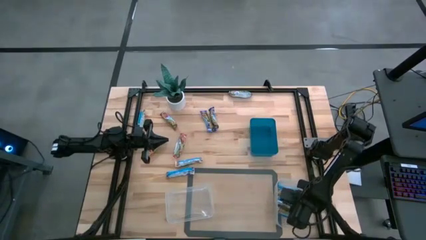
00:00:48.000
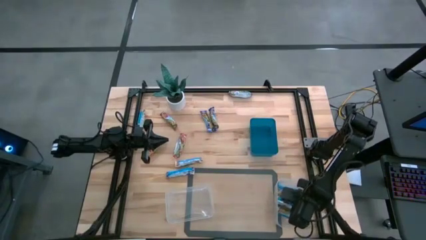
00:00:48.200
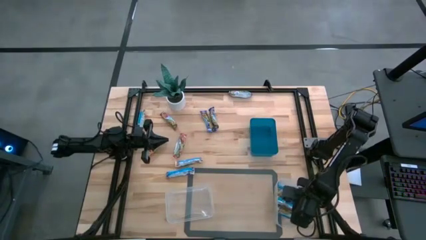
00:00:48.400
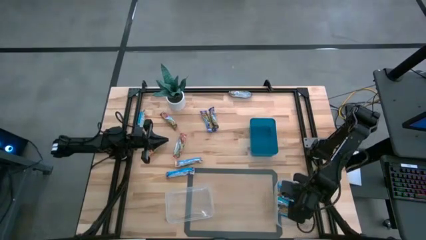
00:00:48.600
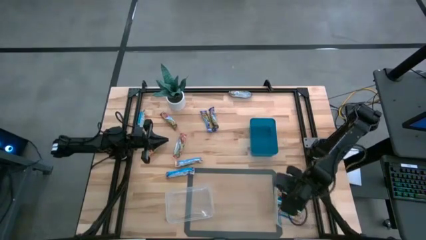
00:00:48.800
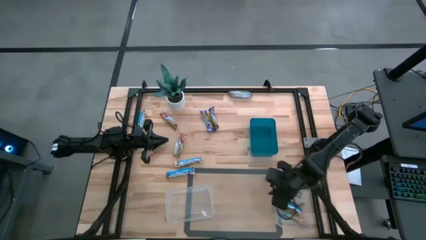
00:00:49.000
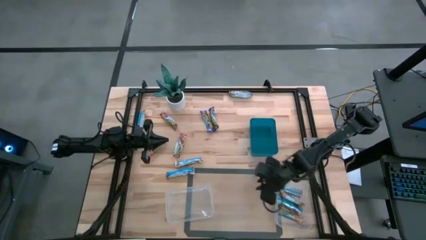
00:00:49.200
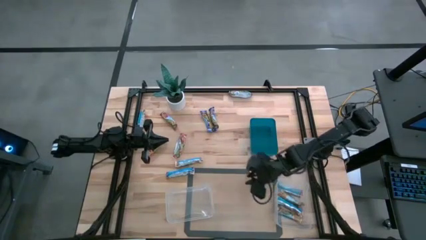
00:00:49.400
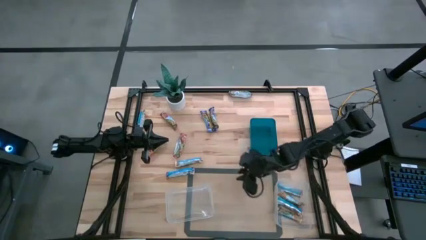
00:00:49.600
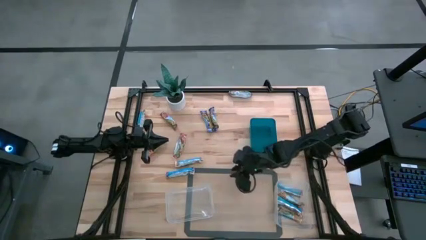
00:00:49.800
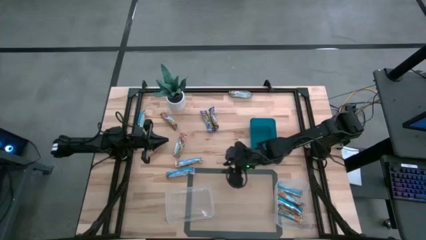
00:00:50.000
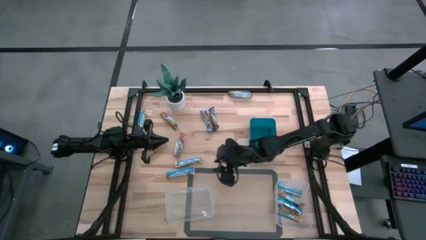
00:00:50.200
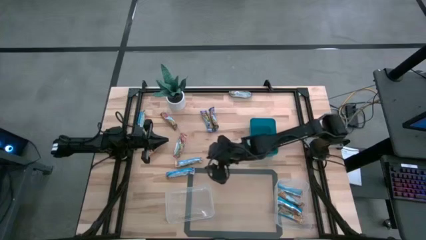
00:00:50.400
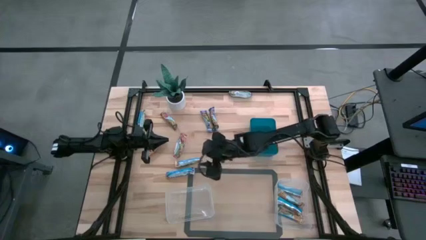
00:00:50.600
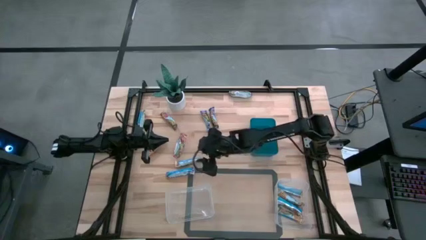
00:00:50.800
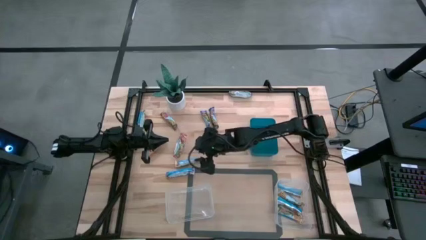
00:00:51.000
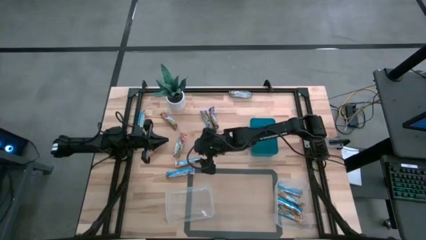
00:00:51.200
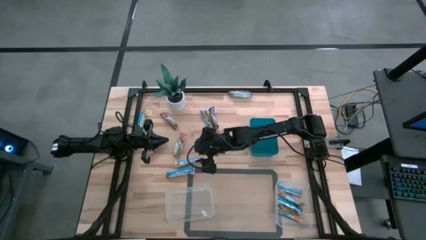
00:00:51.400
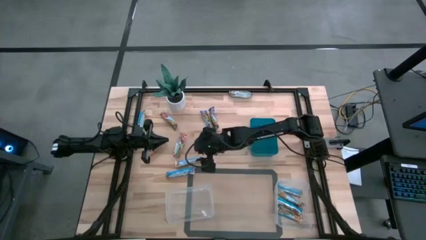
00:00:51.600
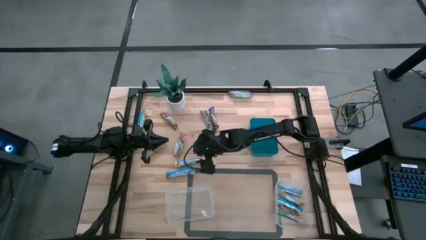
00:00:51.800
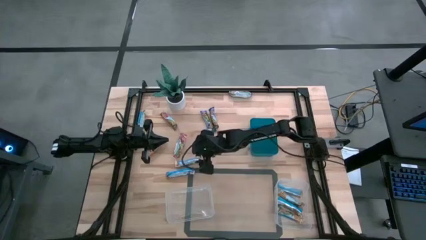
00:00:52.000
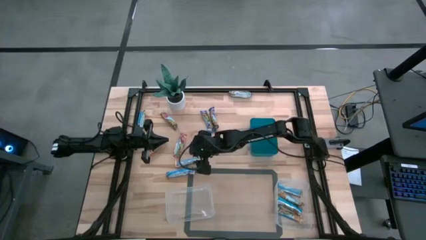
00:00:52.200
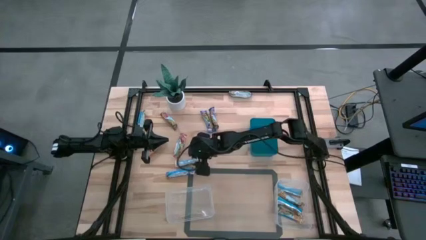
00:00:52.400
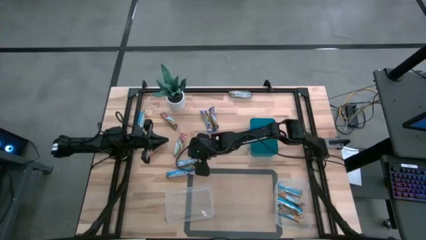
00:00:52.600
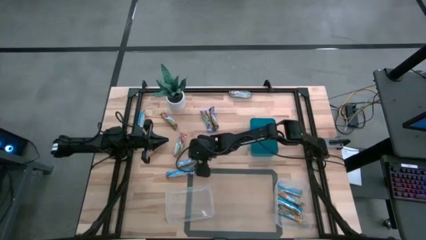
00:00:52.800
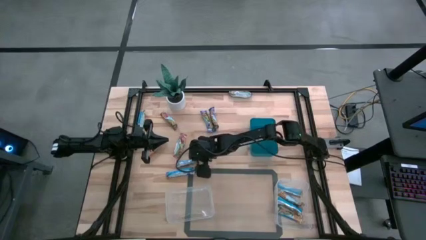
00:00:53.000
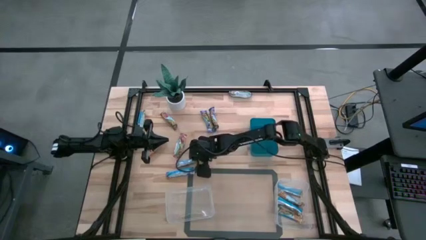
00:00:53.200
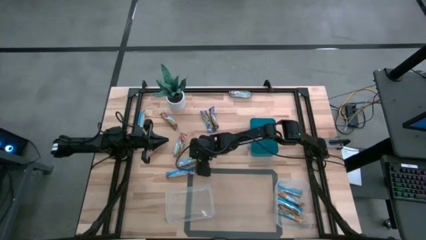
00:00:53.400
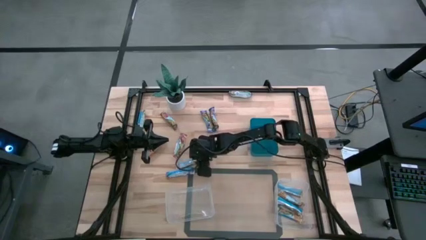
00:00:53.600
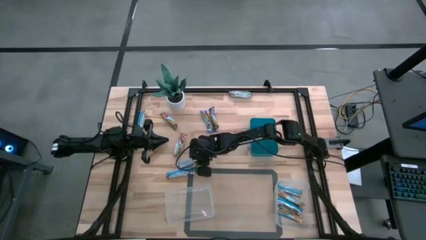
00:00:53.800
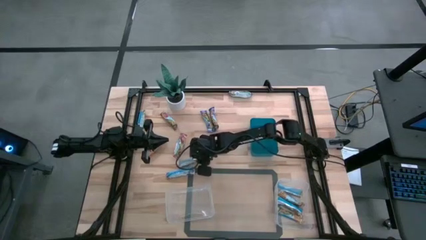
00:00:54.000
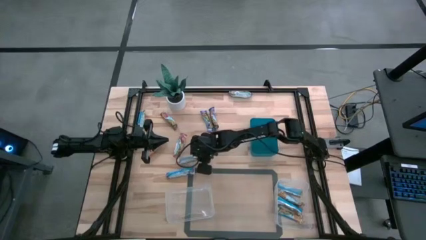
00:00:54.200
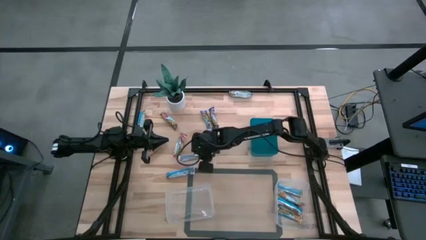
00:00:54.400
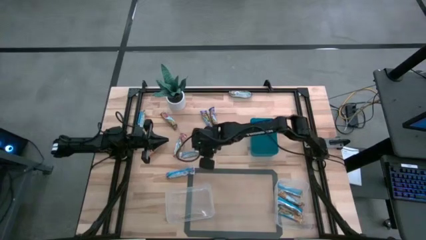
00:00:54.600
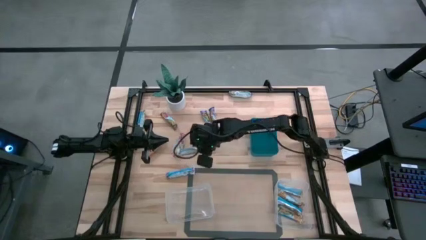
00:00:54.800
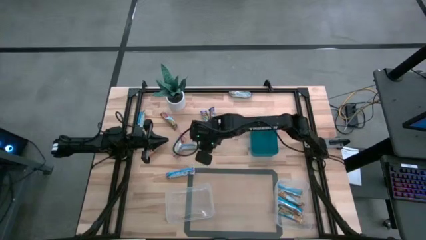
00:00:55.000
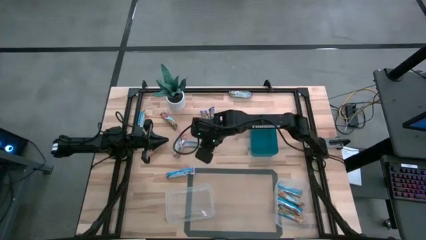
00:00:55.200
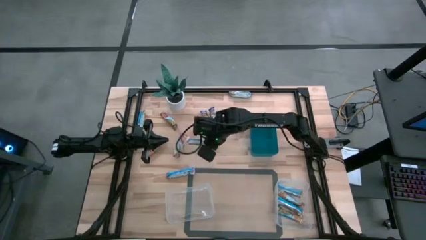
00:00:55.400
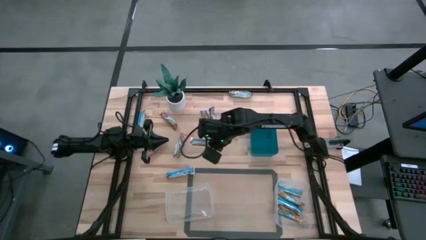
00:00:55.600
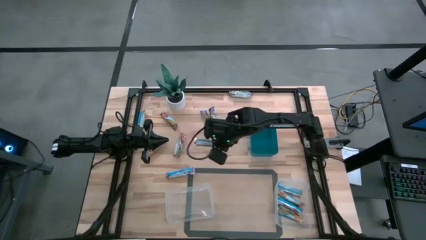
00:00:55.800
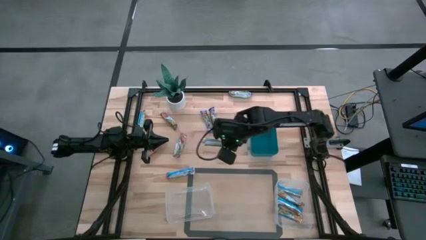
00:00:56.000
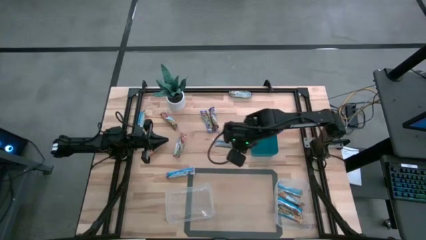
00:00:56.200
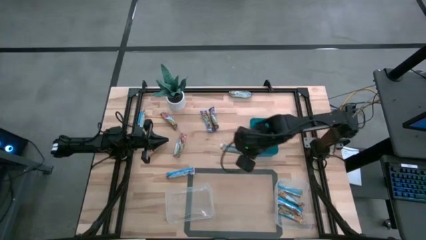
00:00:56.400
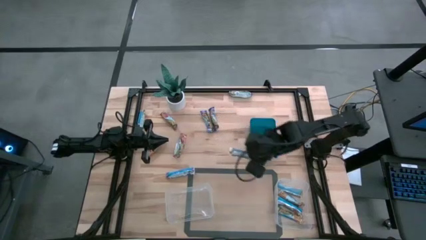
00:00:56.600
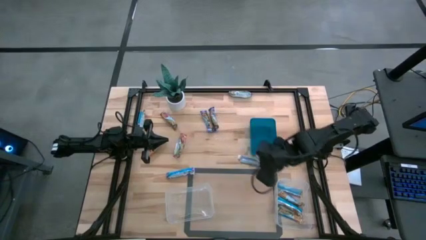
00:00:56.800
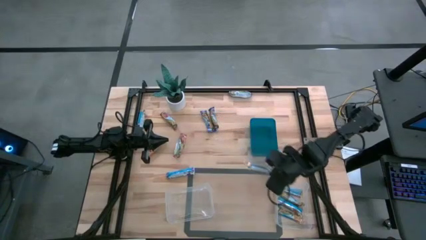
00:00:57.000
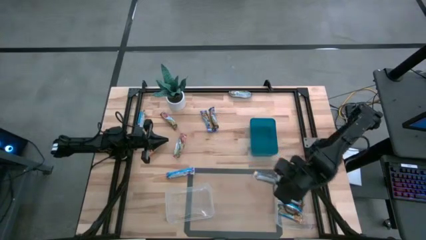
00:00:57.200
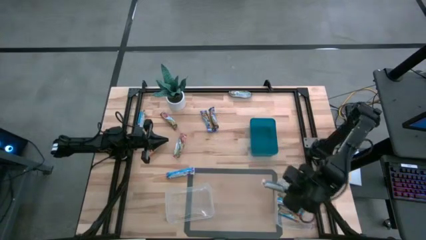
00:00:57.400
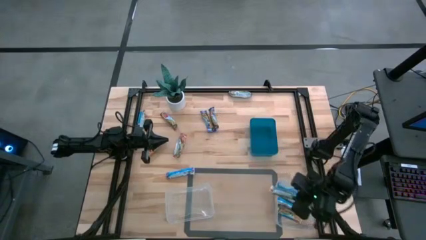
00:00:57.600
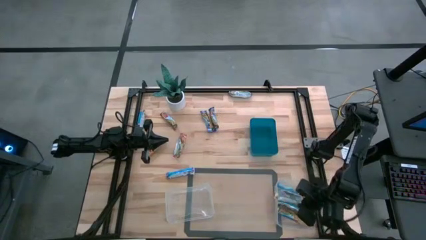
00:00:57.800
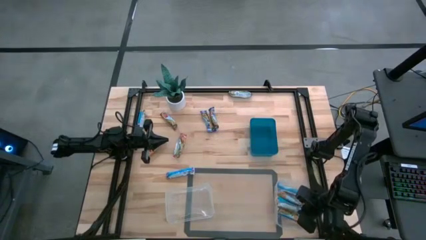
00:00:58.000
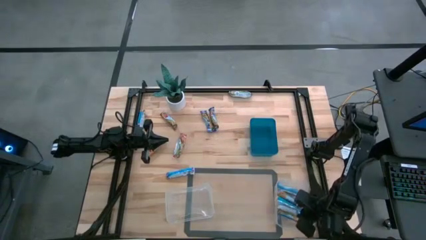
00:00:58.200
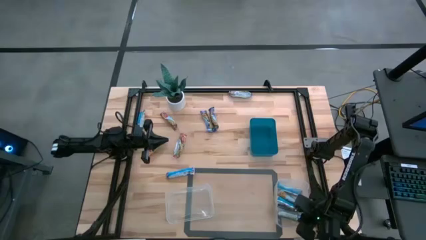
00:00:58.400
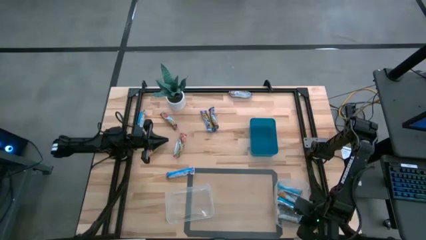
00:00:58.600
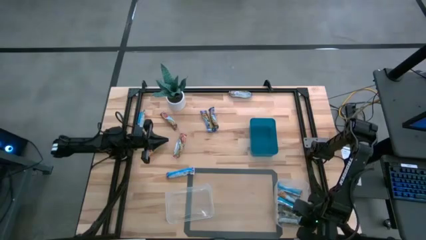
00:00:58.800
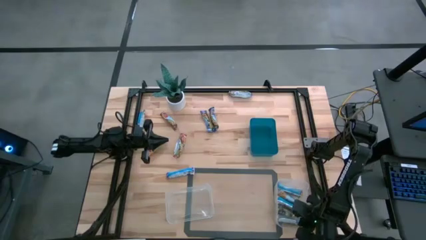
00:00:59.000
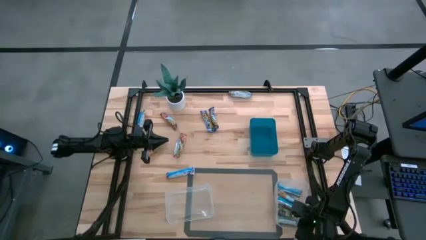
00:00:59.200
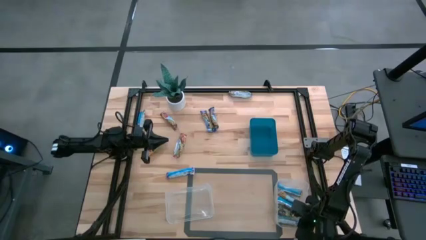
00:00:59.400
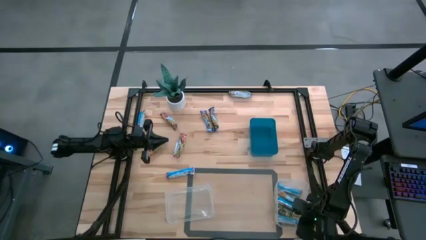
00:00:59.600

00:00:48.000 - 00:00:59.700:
Task: Pick and place Granola Bars by type
Put the yellow granola bar into the right transparent bin

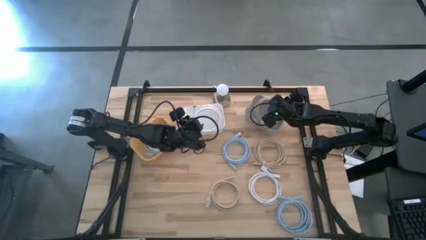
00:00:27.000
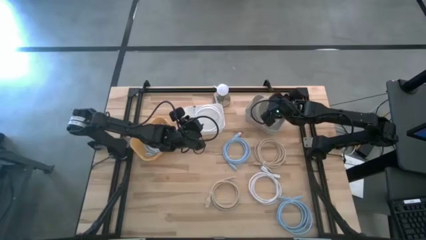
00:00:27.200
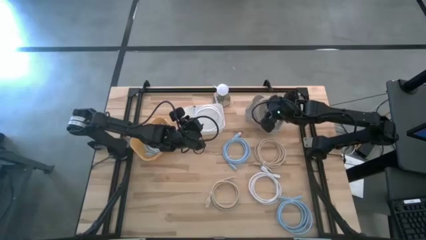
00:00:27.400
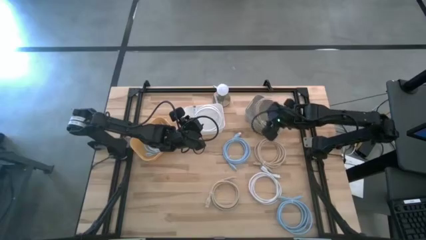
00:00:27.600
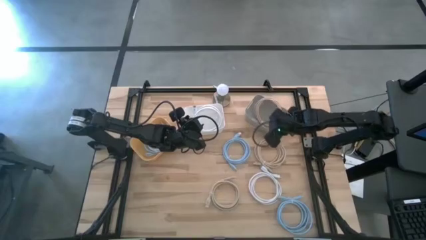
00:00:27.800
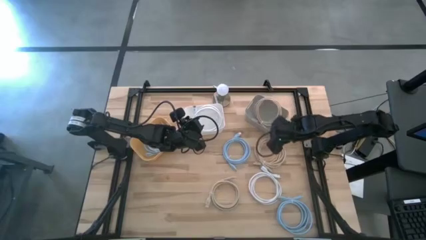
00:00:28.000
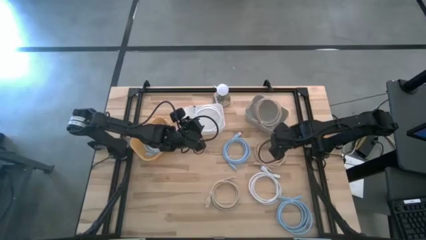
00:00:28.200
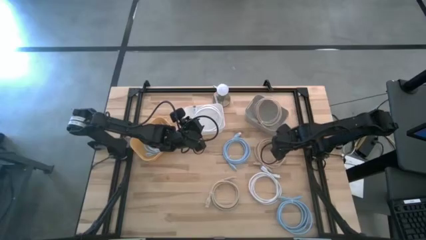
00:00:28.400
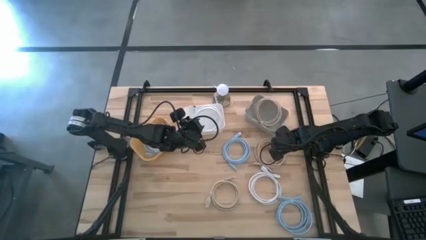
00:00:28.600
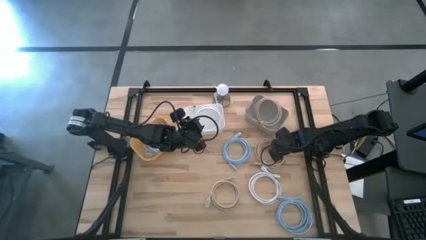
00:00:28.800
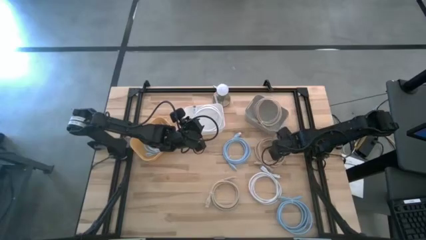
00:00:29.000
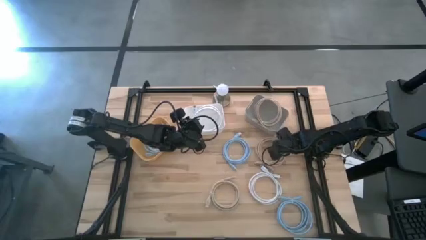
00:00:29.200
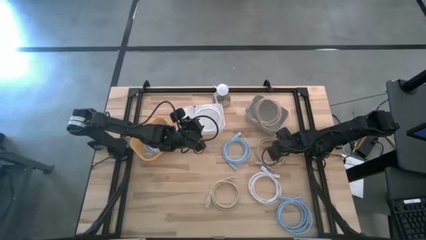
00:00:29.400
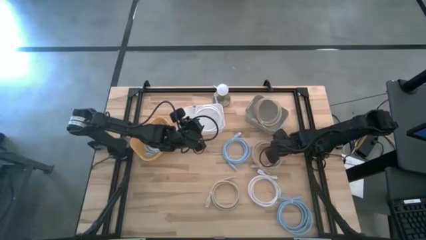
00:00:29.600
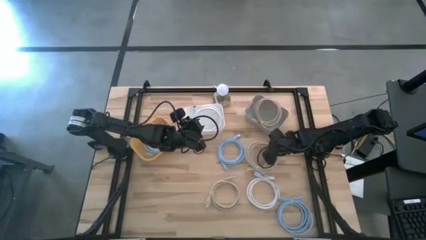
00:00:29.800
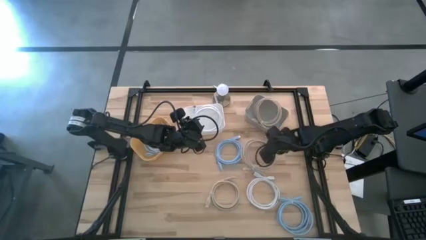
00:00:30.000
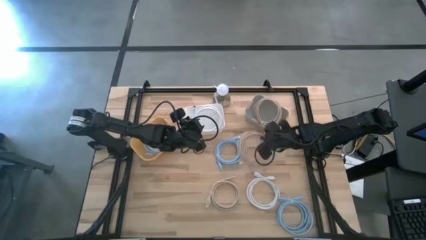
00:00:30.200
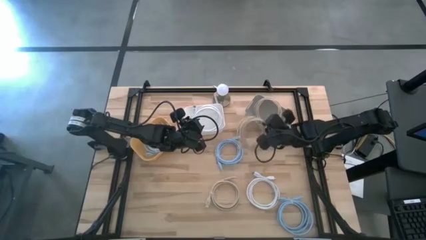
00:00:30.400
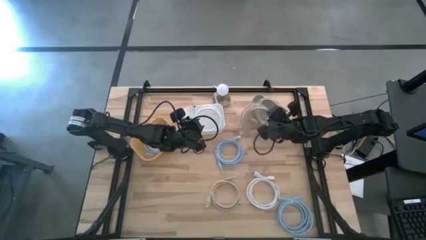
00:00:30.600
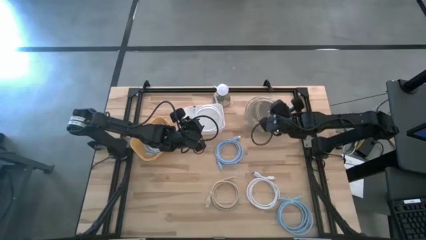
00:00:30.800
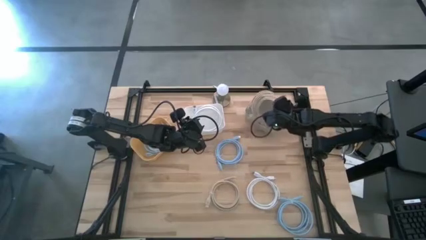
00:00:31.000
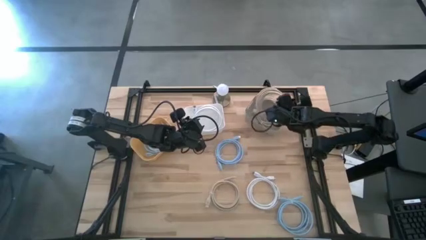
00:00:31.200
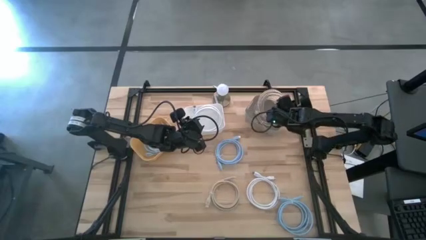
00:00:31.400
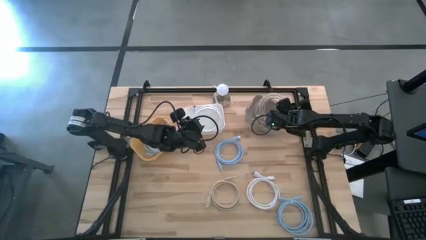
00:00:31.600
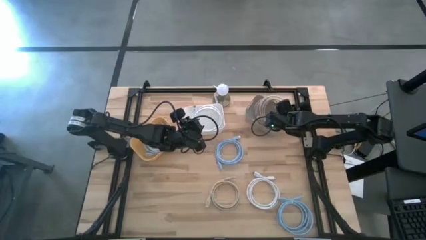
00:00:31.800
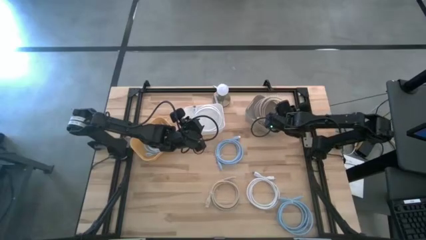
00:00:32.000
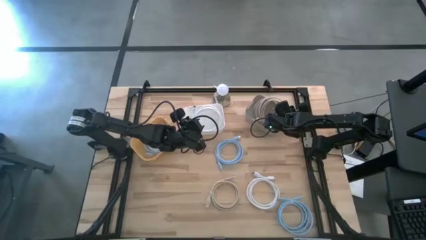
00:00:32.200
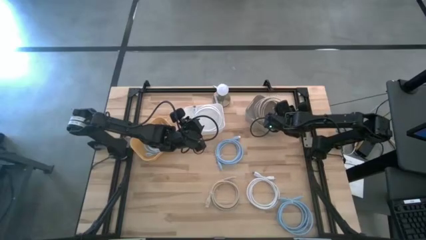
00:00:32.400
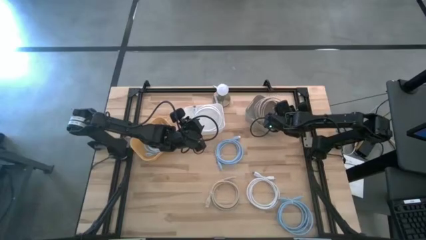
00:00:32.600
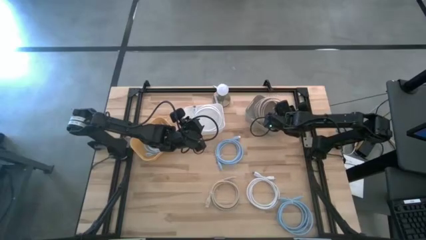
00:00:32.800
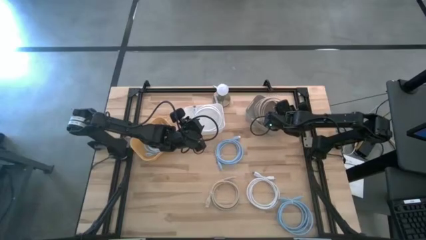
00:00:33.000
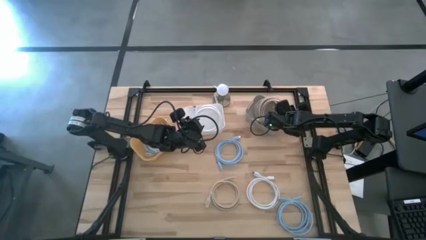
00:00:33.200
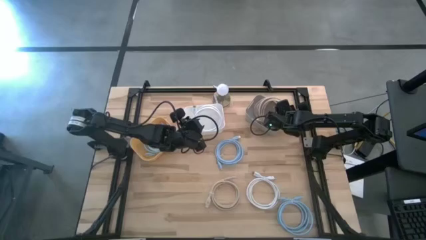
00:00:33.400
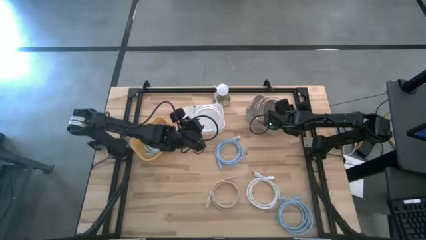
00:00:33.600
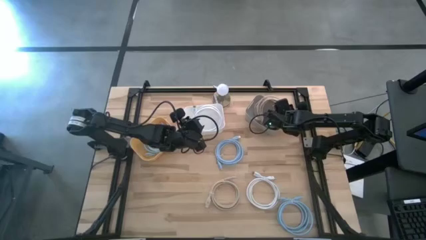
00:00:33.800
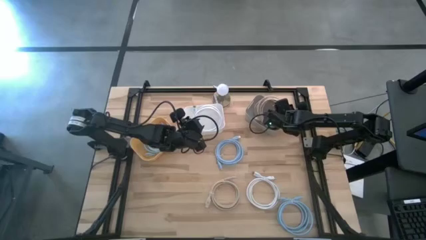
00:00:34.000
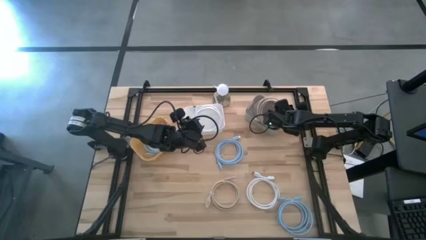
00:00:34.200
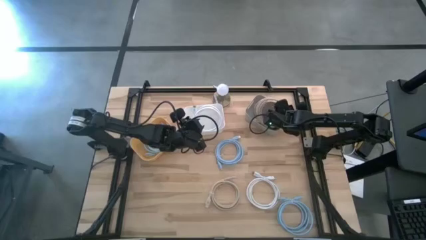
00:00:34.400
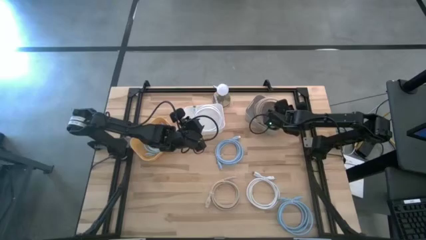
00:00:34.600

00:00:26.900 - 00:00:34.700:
Task: Sort HDMI cables
Put the top right brown hdmi cable into the gray bin
